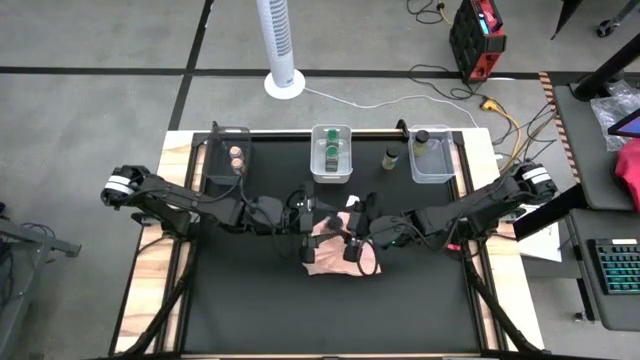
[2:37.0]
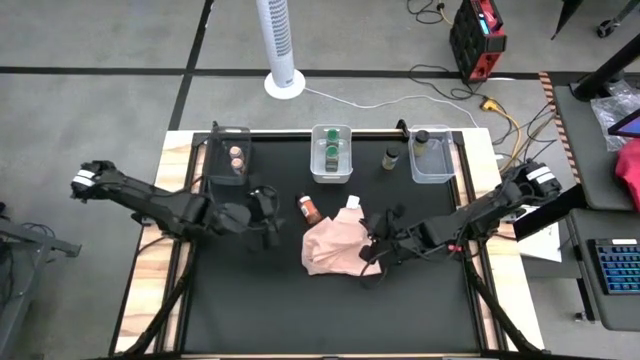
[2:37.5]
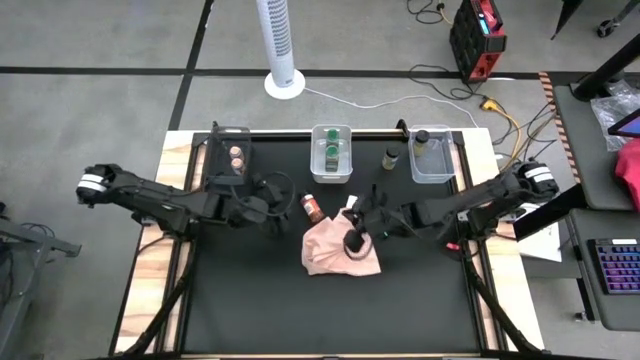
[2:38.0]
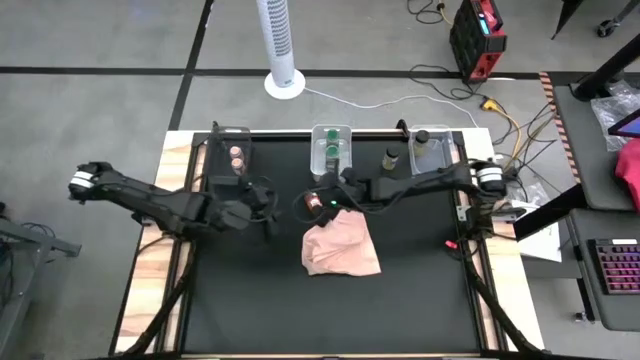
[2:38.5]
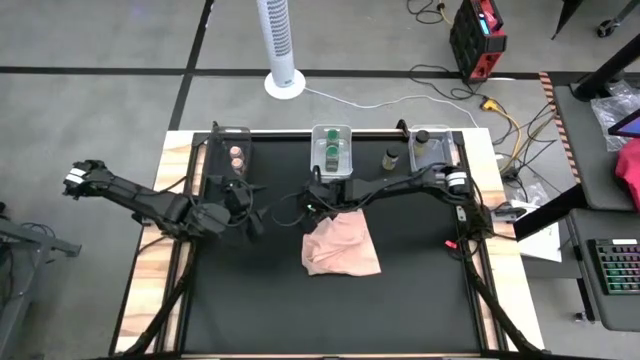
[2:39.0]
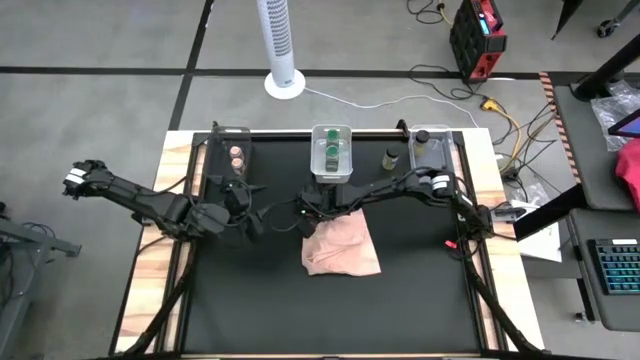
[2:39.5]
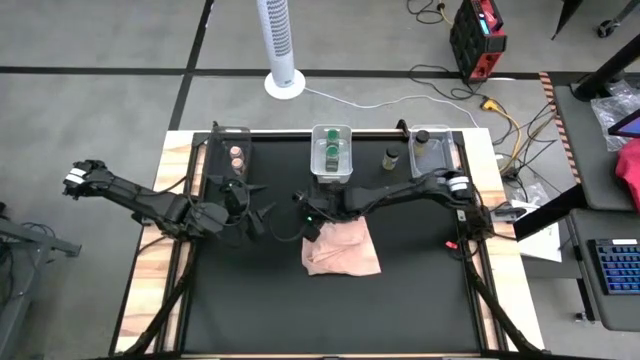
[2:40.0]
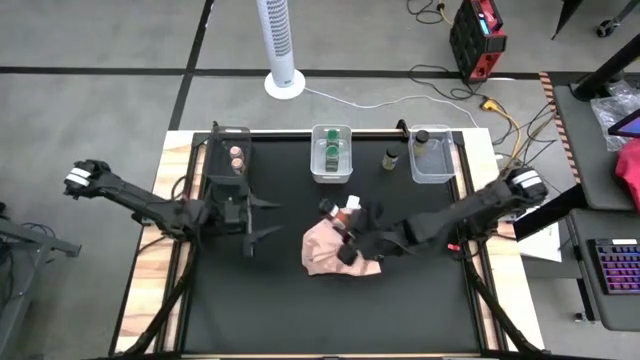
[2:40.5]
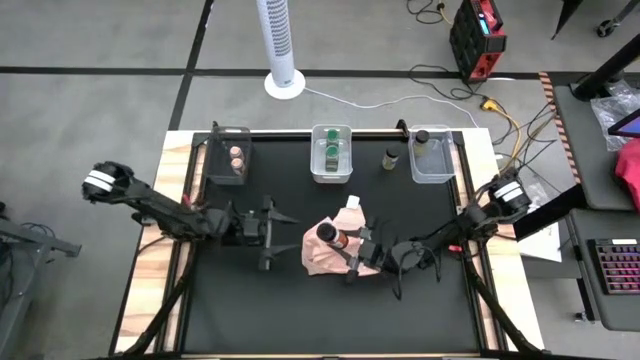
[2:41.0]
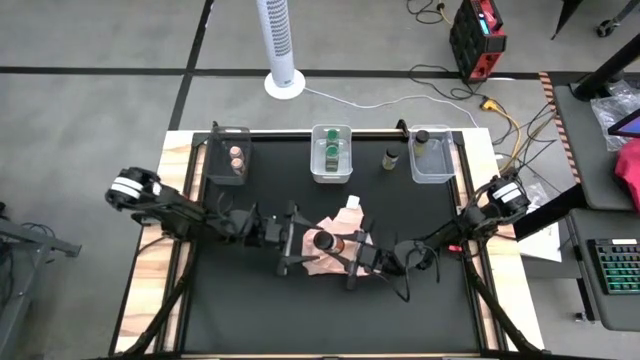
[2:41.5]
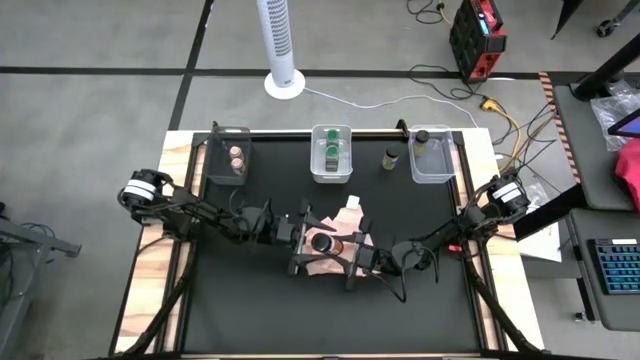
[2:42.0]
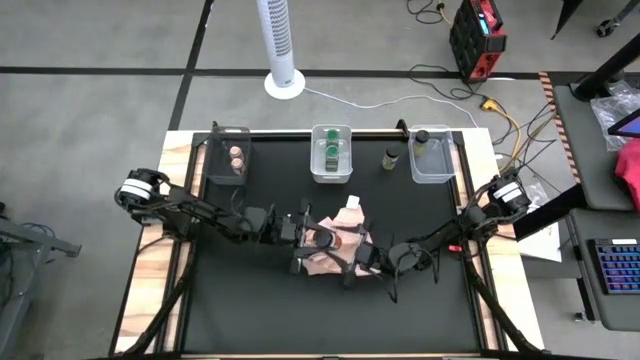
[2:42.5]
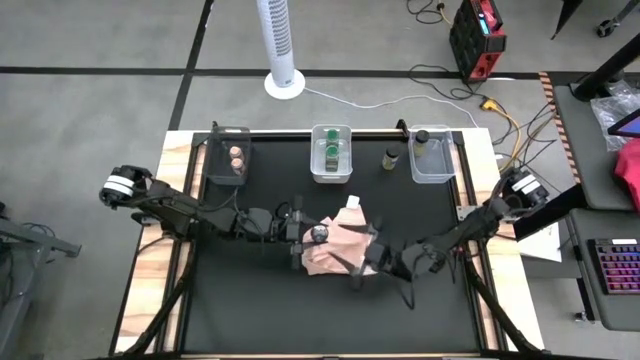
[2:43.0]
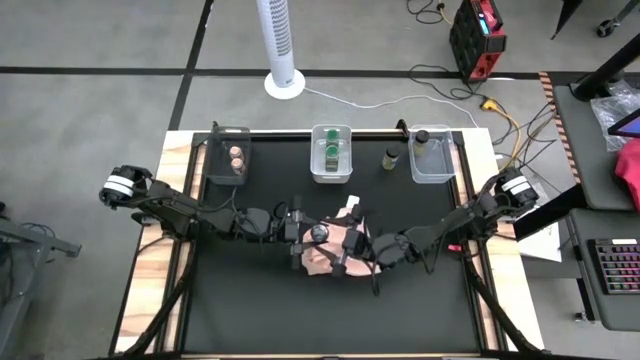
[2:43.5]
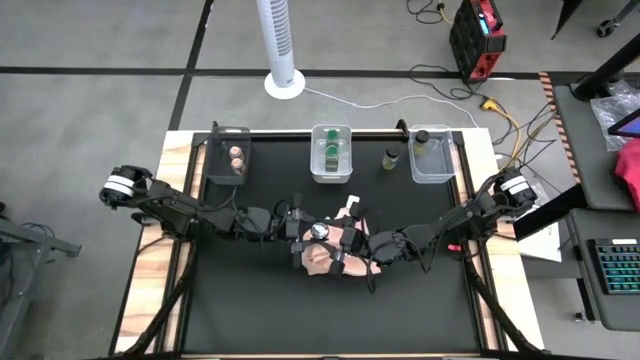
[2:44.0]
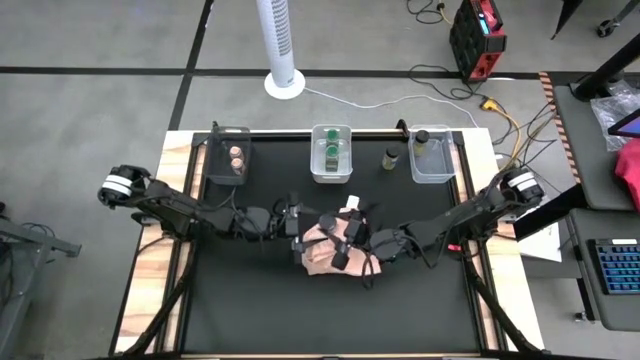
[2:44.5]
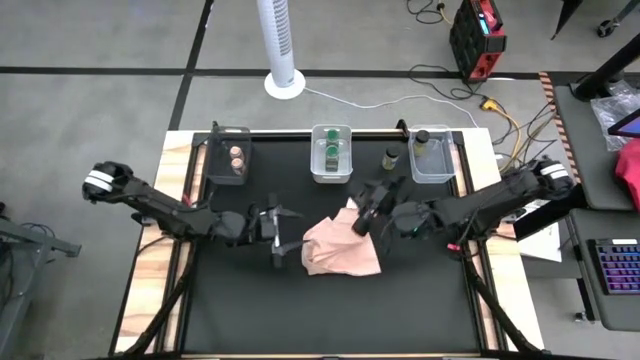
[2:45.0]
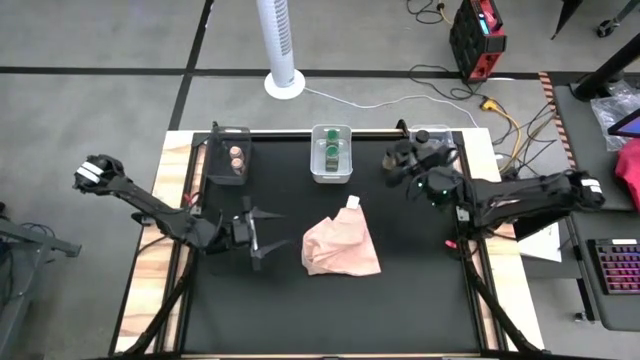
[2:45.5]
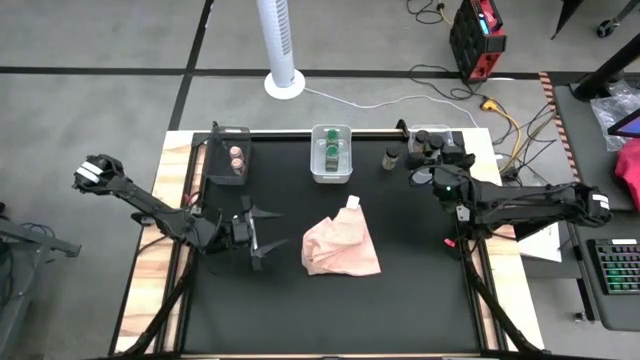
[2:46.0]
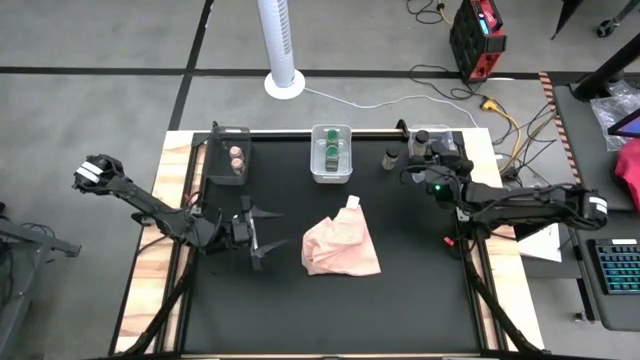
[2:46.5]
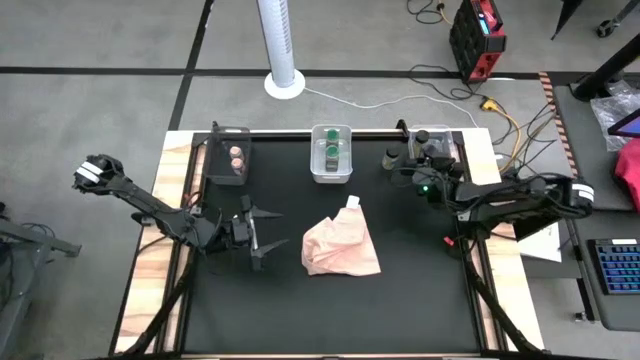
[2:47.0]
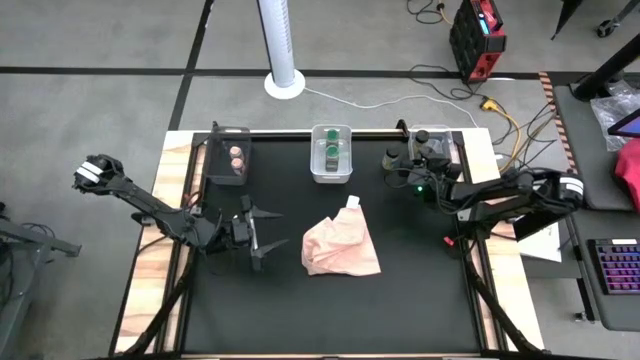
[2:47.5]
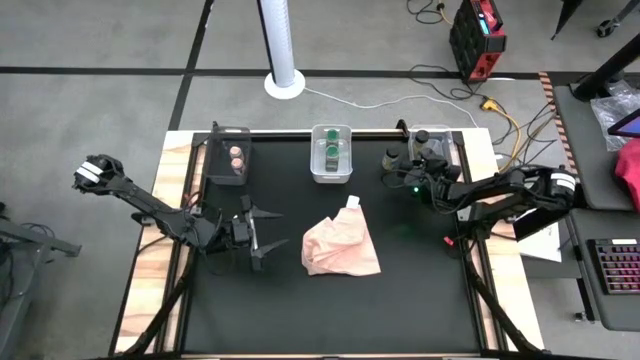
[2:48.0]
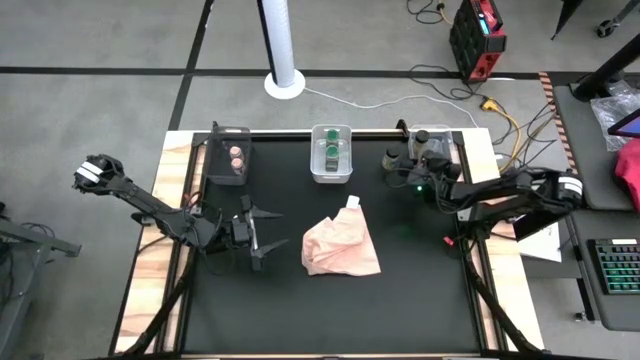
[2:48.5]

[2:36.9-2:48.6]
Task: Sort spices by type
Put the black brown spice bottle into the transparent bin

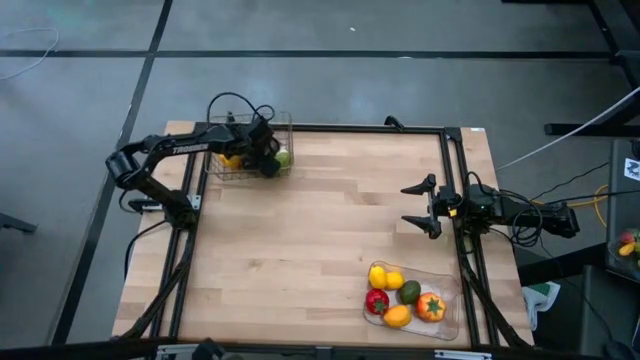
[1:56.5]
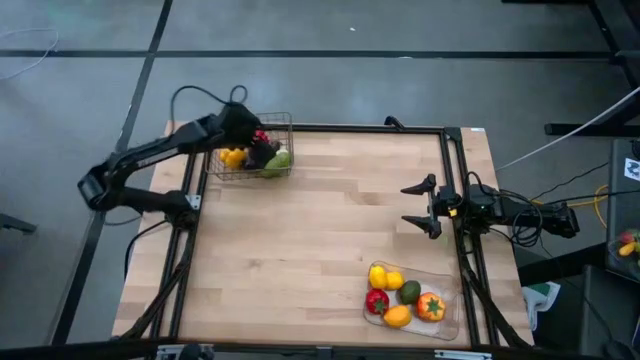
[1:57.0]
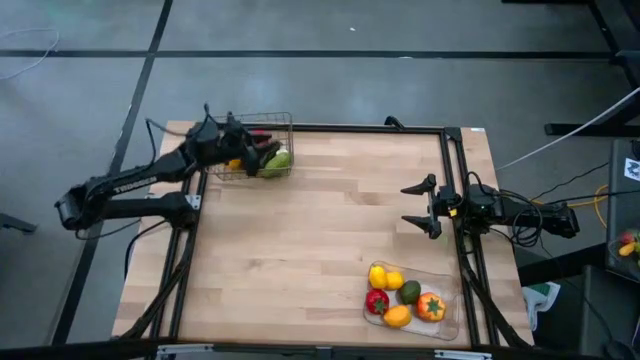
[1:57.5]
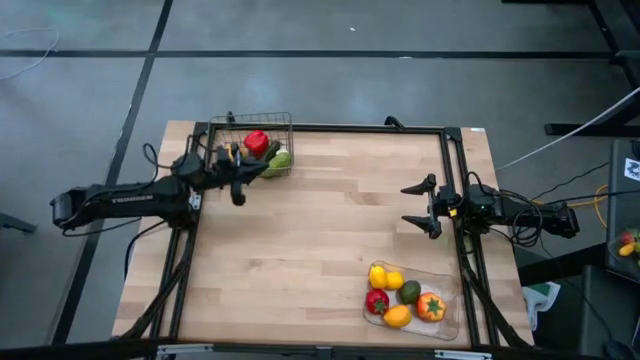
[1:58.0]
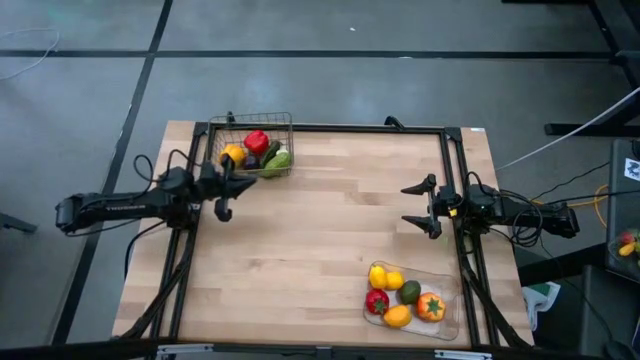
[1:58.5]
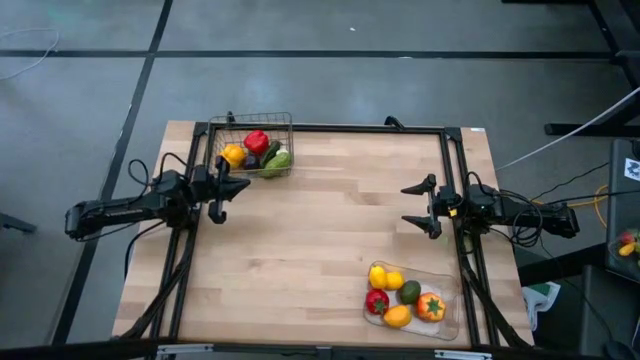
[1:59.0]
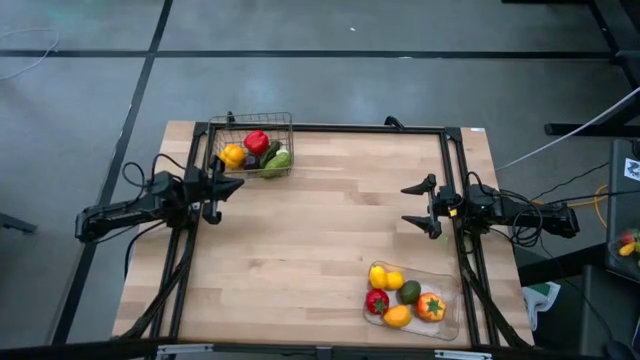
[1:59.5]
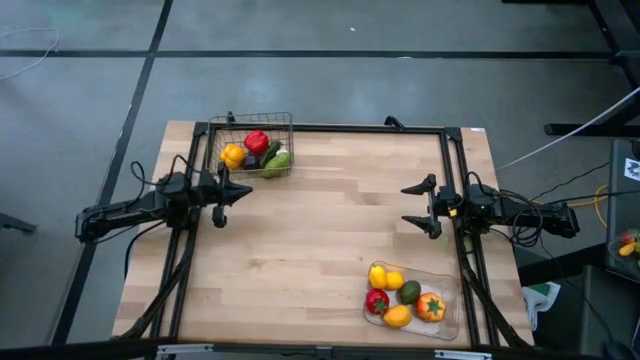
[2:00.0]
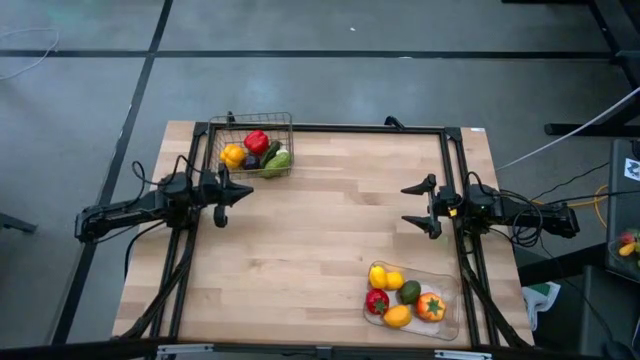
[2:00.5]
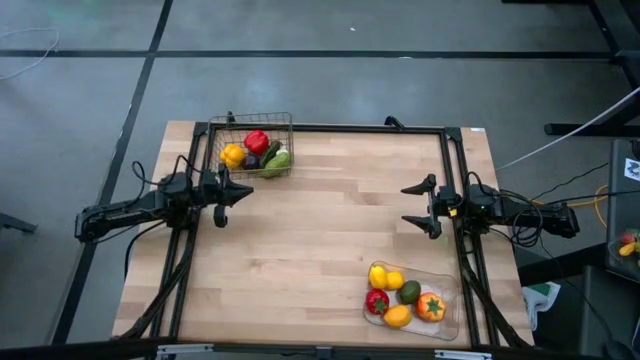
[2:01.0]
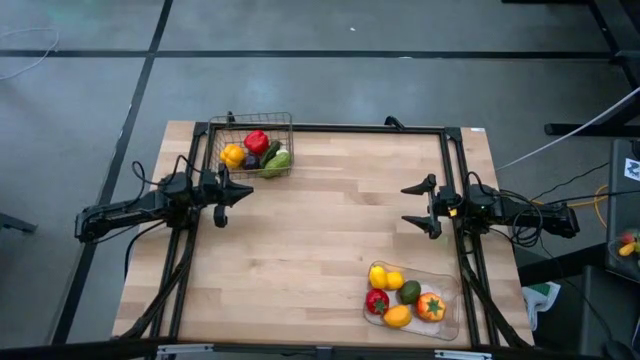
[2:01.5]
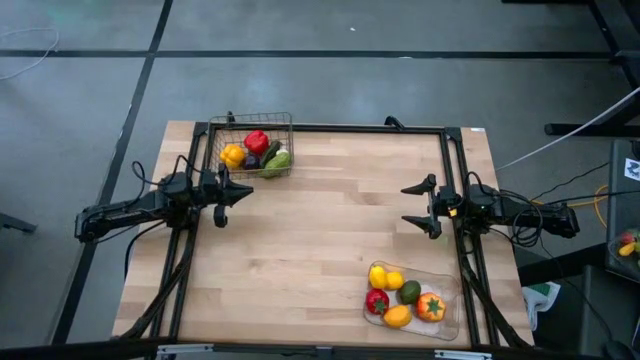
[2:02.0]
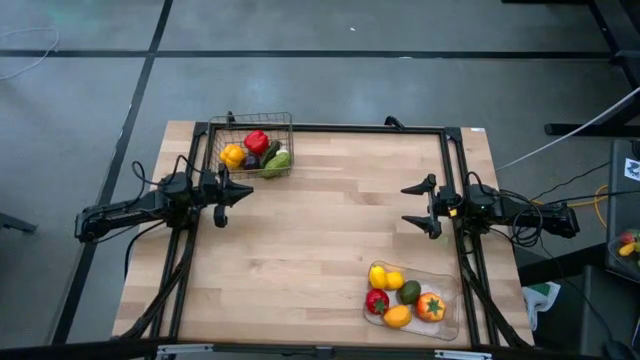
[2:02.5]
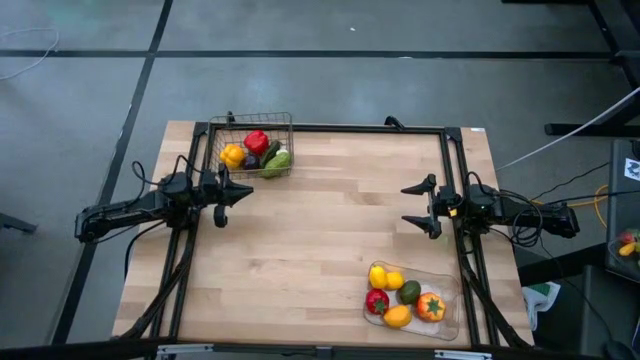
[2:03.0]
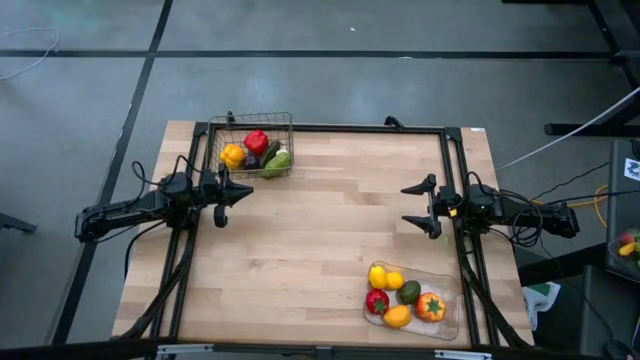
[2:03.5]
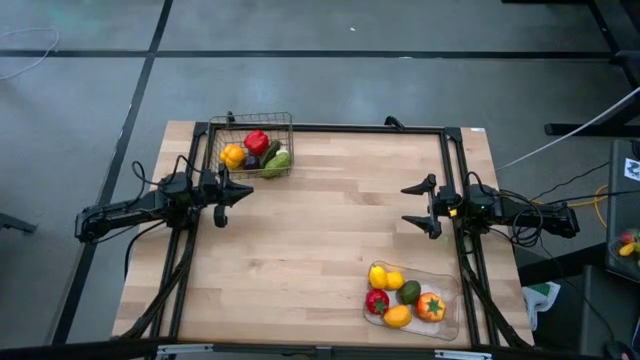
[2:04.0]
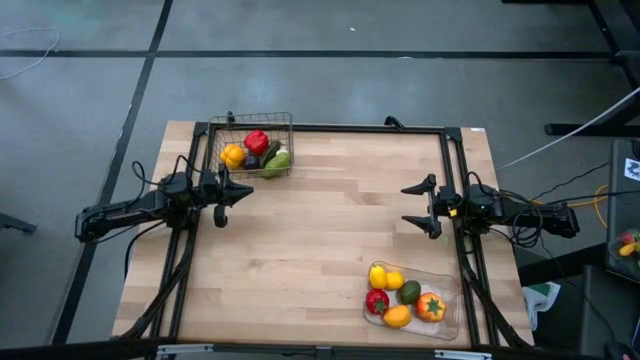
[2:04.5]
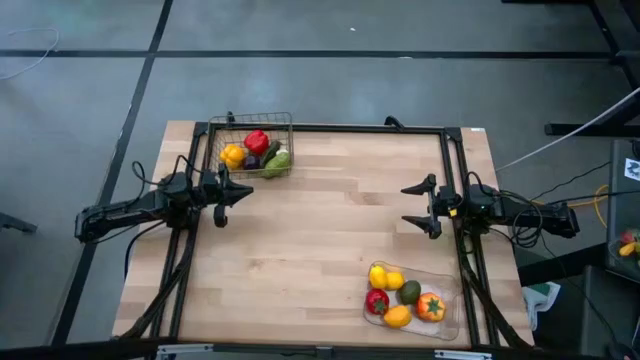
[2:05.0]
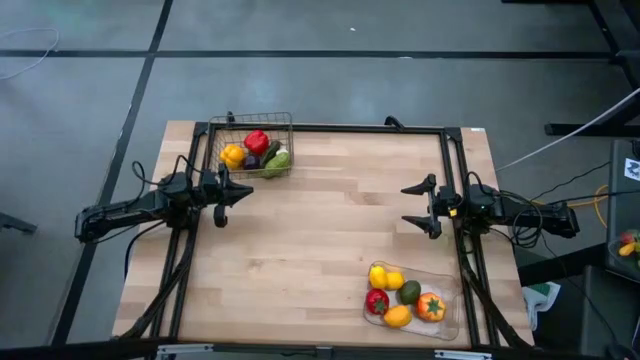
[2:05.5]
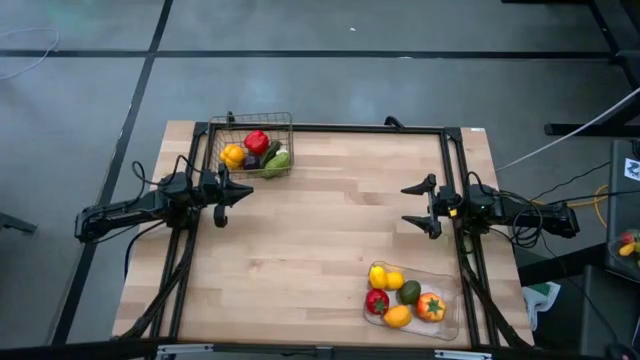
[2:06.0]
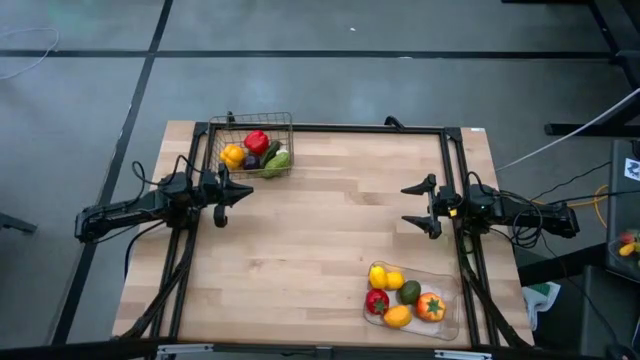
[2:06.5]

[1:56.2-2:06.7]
Task: Sort produce into baskets
Return to Home Position
